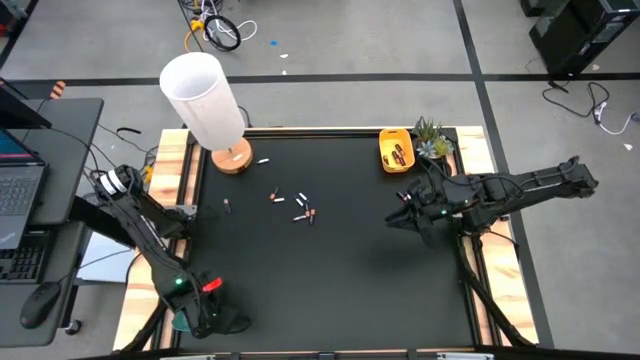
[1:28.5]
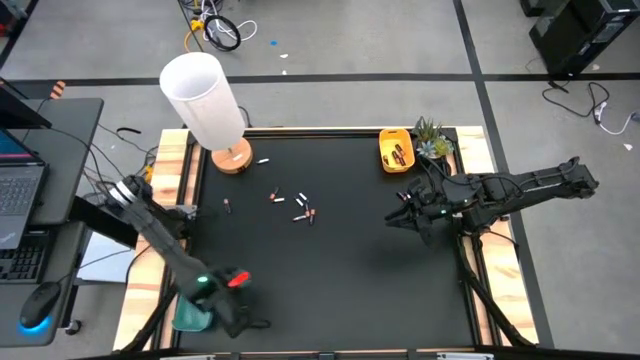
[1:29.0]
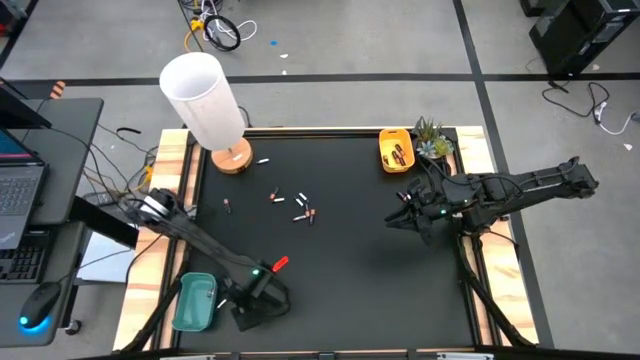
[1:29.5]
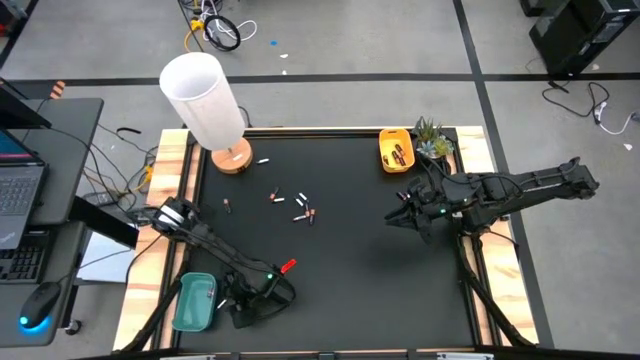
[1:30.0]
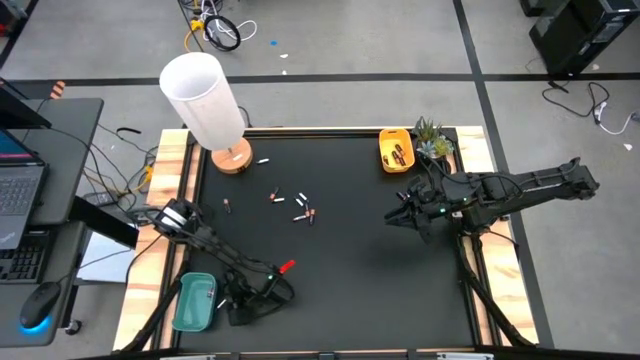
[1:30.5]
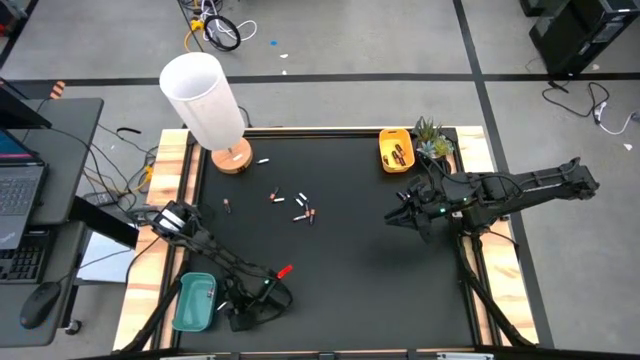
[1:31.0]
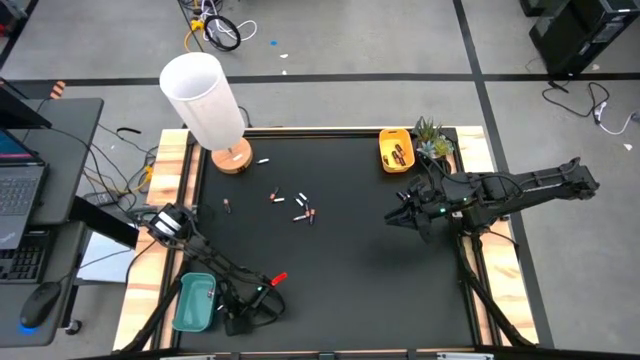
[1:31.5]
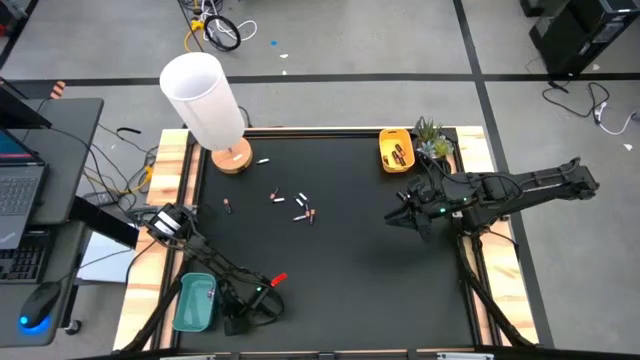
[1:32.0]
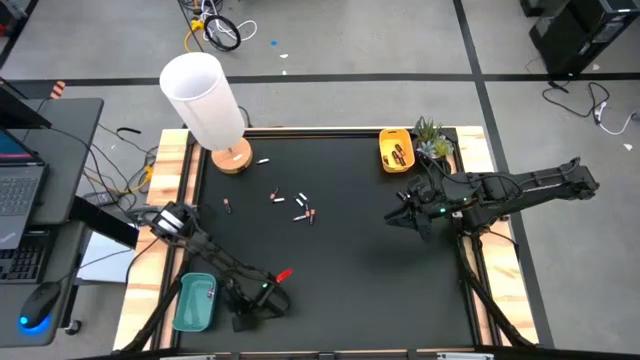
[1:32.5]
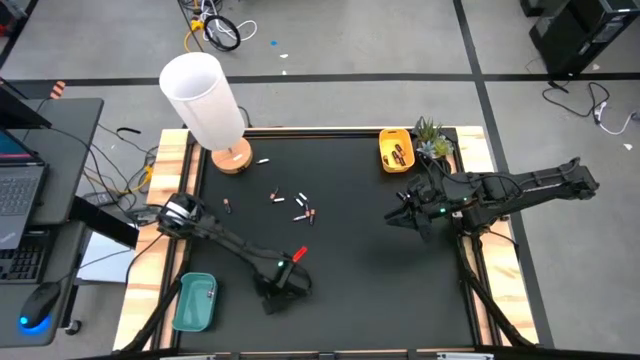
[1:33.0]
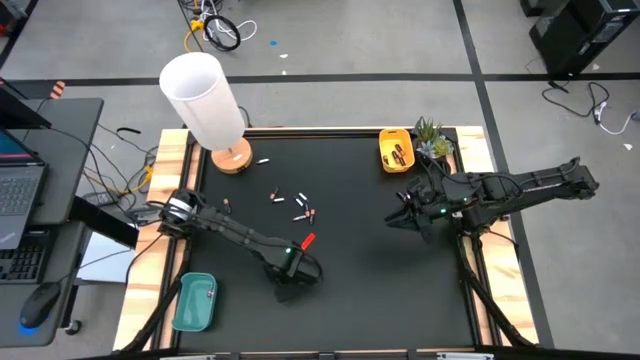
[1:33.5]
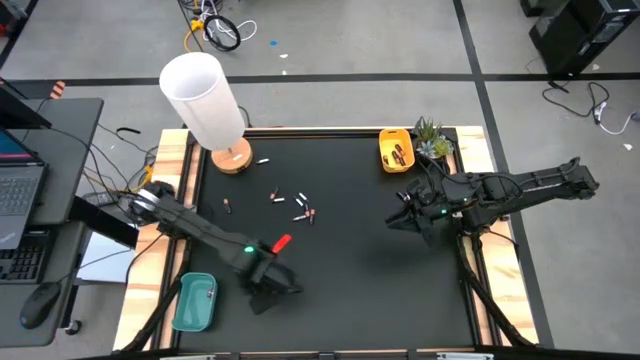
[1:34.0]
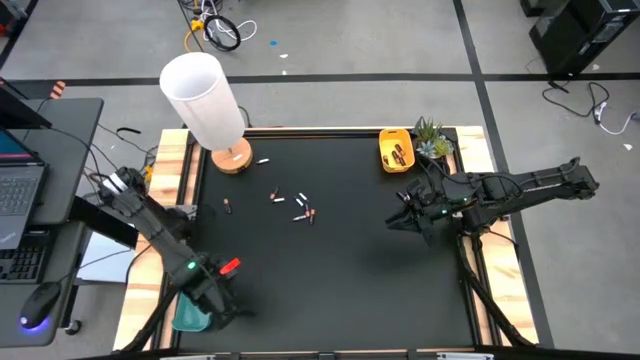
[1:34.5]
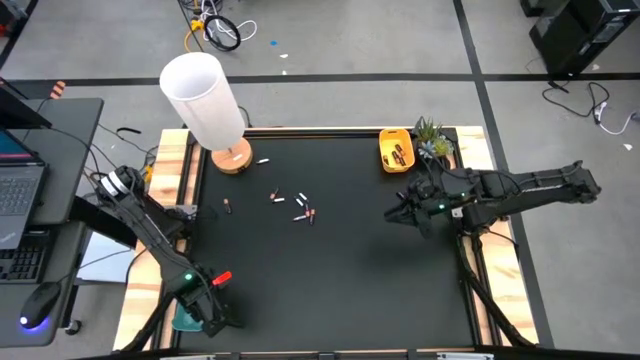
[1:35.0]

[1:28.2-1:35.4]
Task: Sort batteries
Put the silver battery into the blue bin

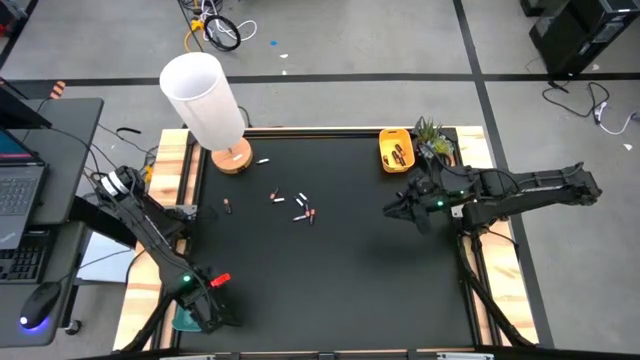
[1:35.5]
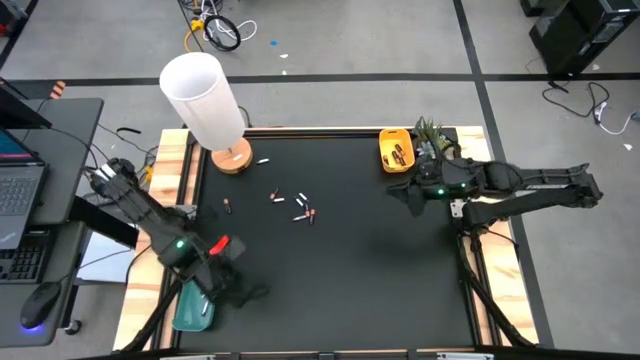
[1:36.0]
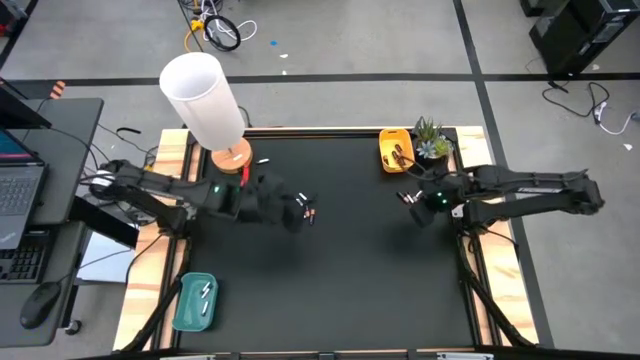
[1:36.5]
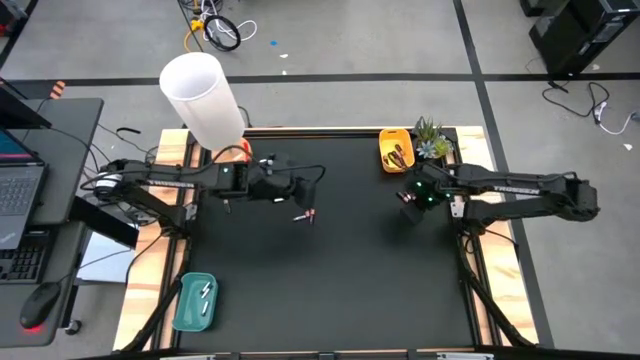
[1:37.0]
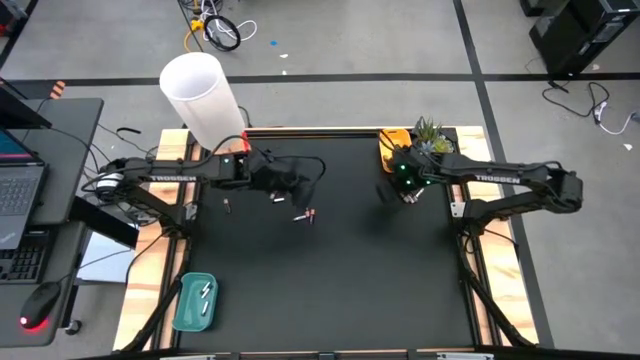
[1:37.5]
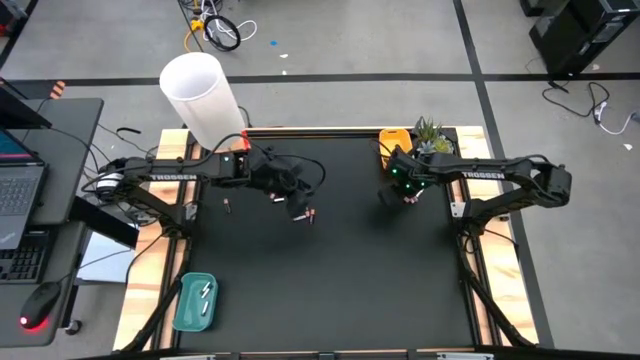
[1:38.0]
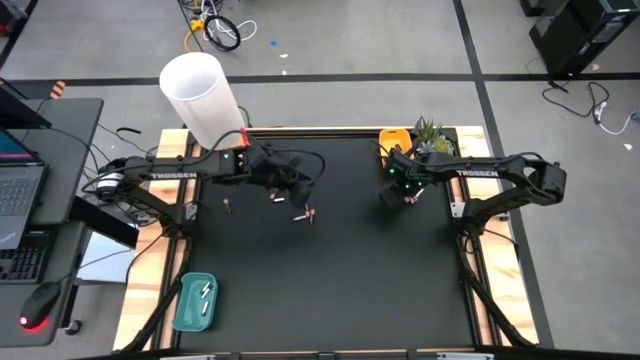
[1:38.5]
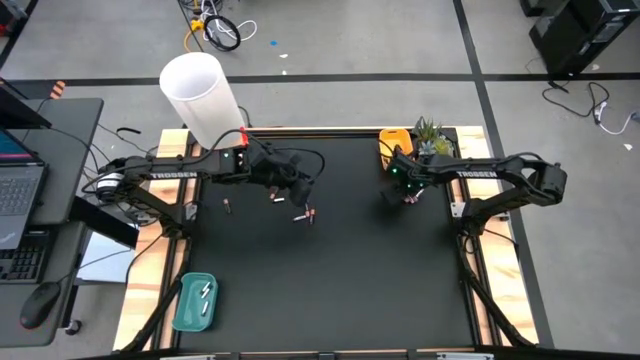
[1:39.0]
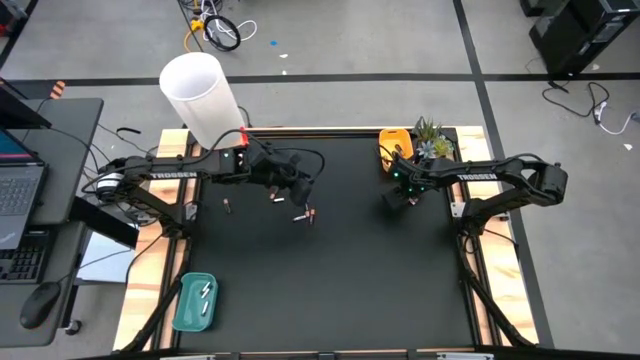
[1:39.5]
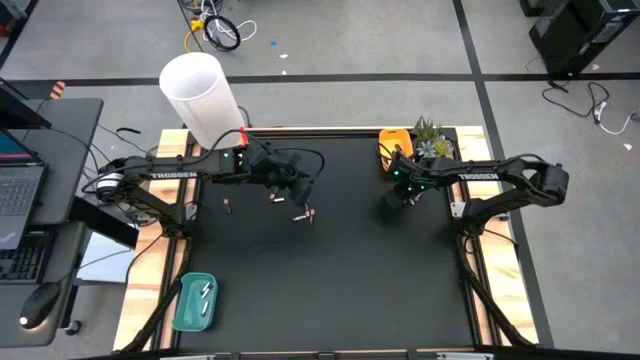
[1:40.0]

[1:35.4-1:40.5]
Put the black battery into the yellow bin

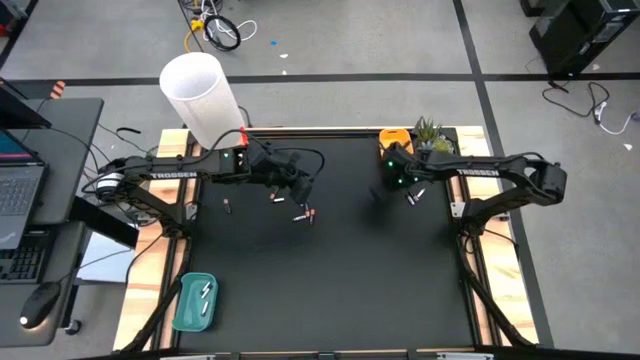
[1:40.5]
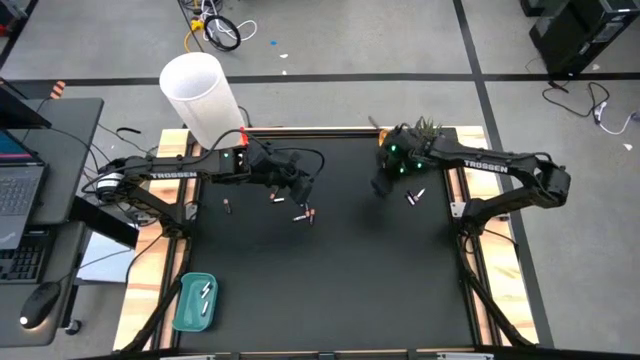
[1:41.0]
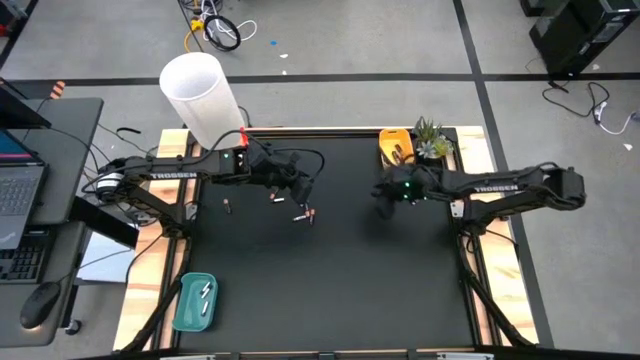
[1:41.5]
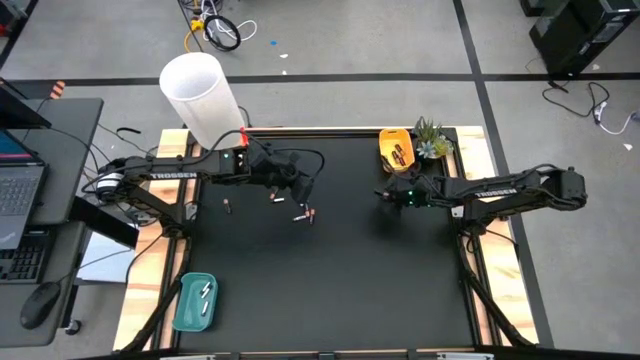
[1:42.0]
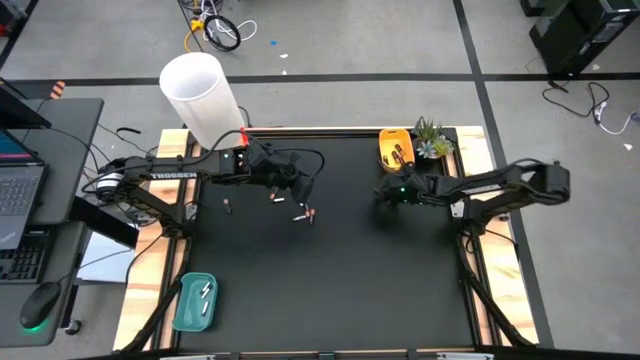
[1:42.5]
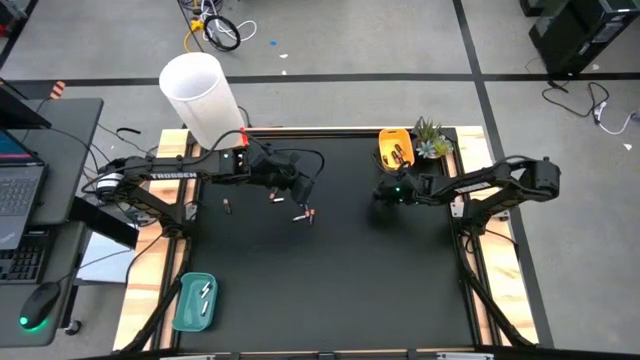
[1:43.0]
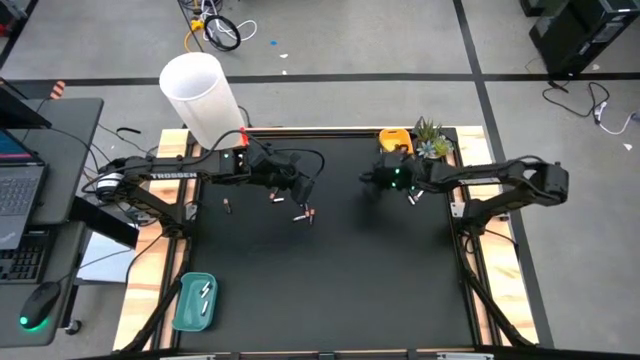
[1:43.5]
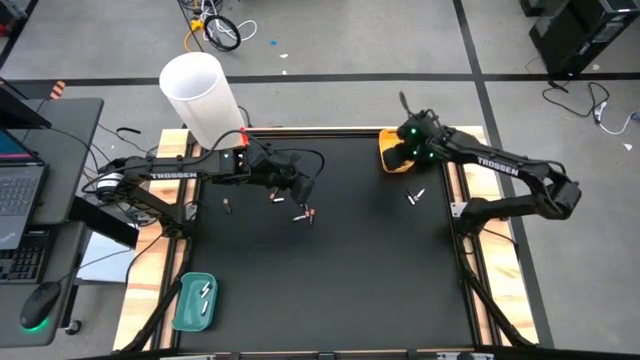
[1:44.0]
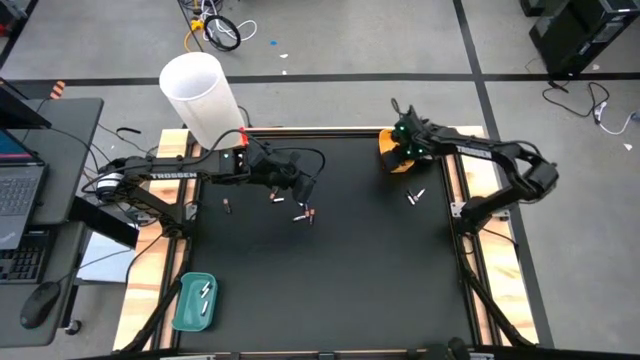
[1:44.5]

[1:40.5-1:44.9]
Put the black battery into the yellow bin

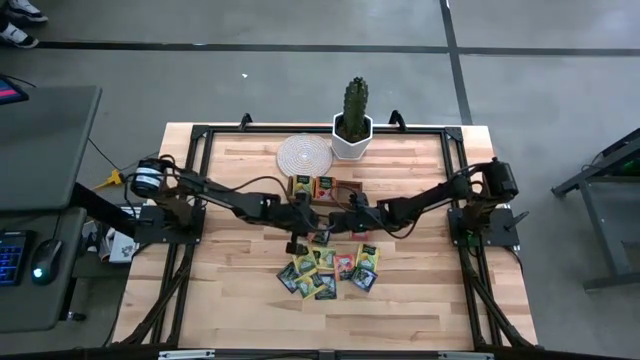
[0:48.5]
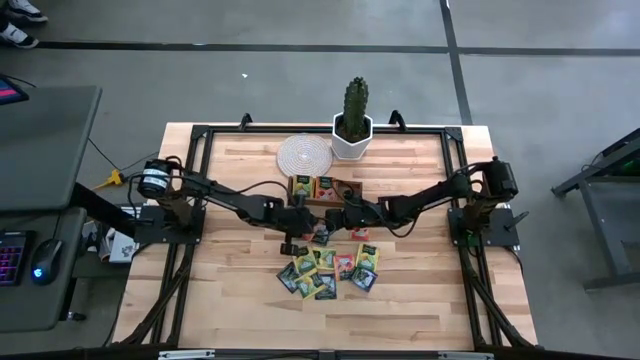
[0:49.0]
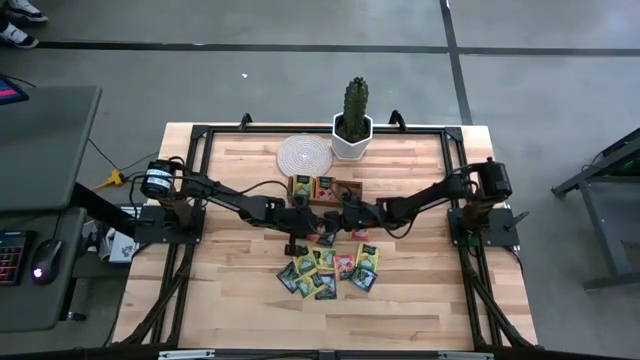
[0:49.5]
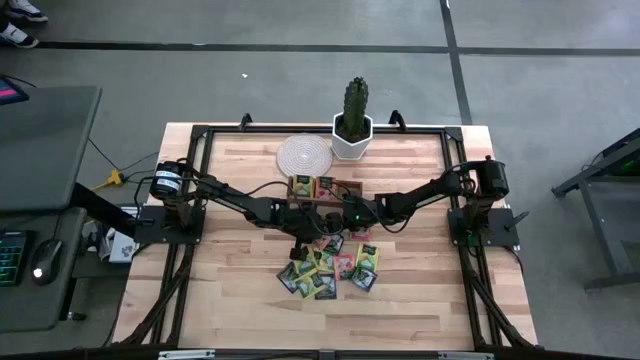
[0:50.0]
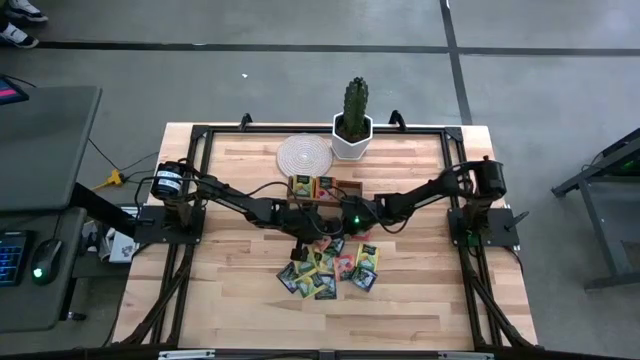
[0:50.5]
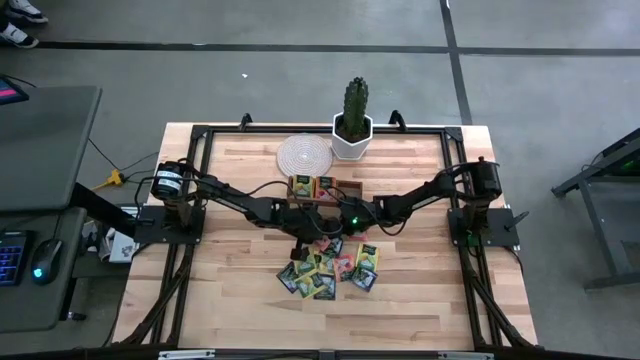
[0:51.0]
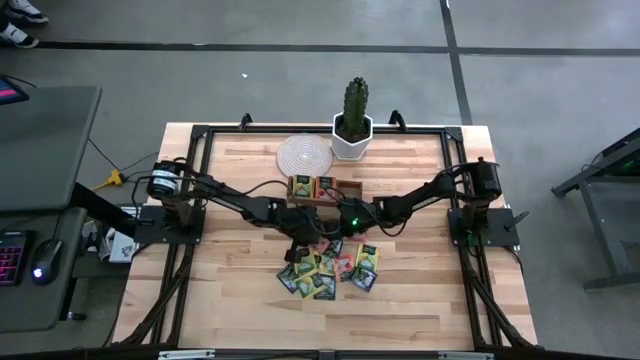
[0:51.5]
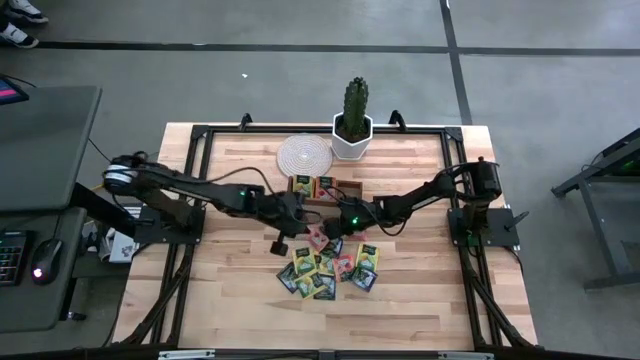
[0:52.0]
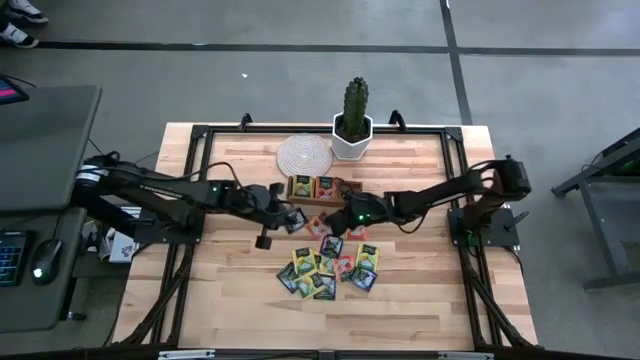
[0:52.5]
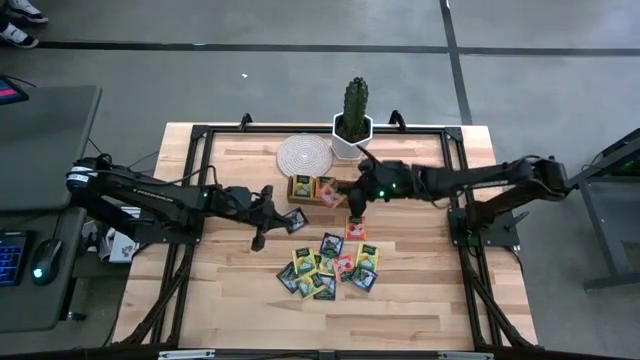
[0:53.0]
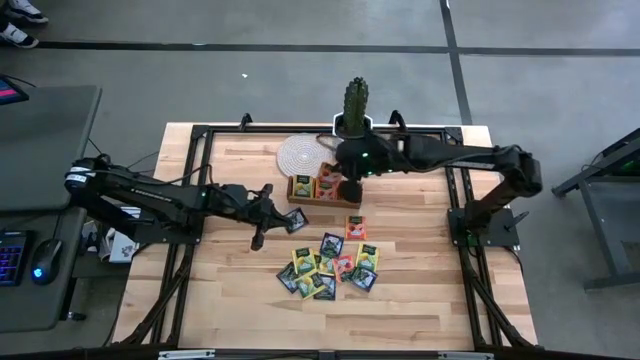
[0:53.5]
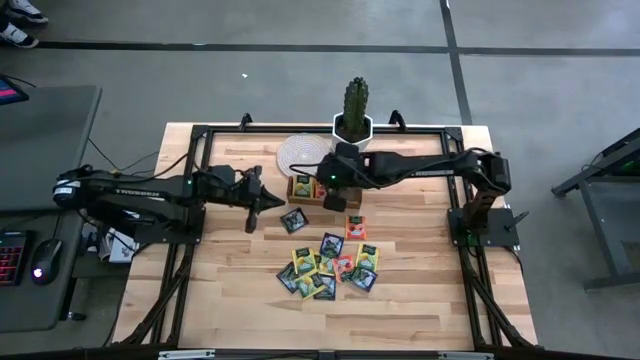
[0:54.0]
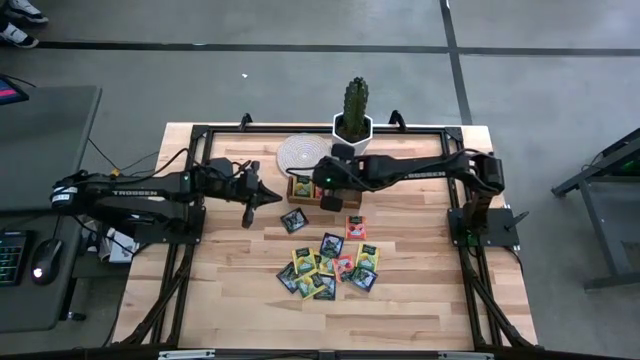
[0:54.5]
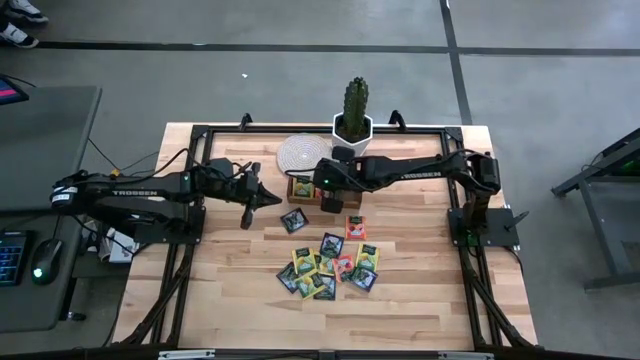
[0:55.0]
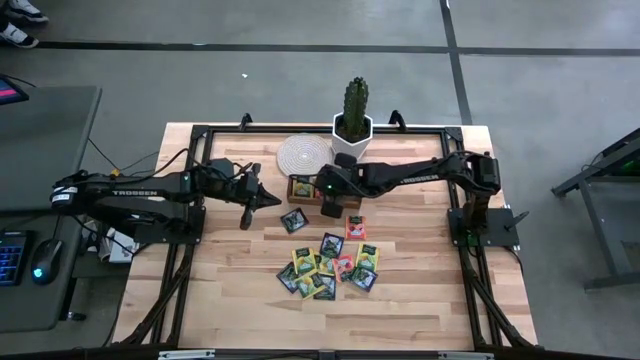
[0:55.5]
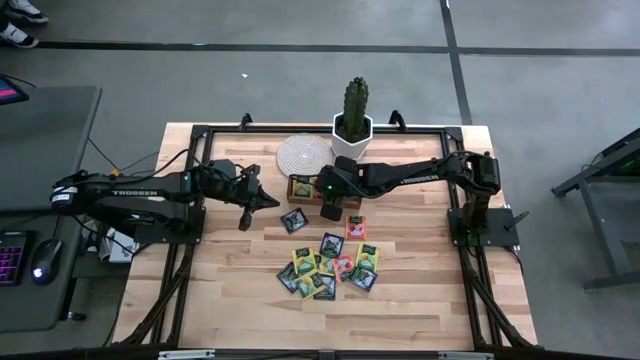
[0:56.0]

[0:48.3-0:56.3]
Task: Pick & Place Tea
Put the orange tea bag into the middle section of the wooden organizer
